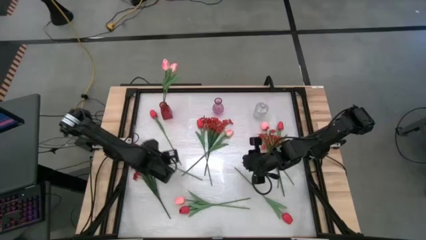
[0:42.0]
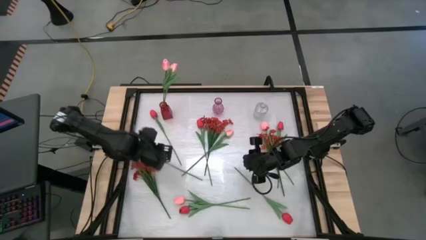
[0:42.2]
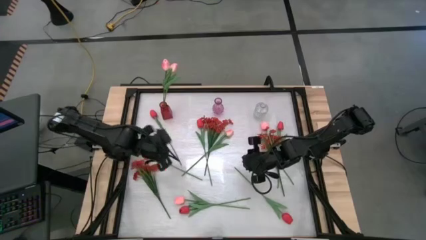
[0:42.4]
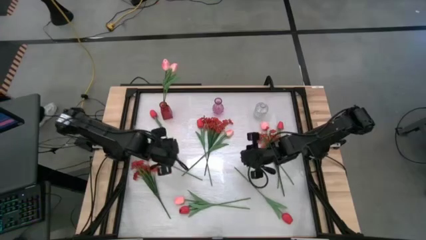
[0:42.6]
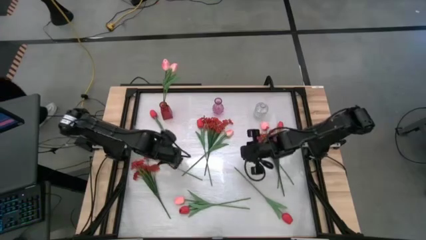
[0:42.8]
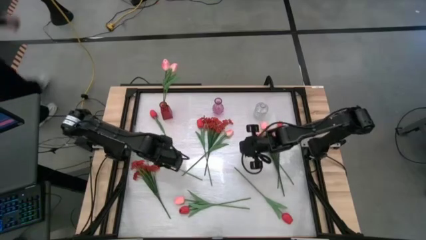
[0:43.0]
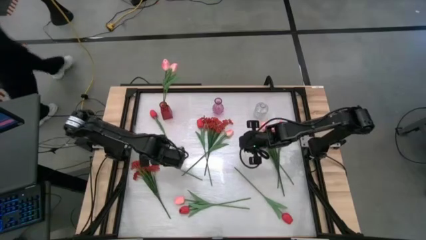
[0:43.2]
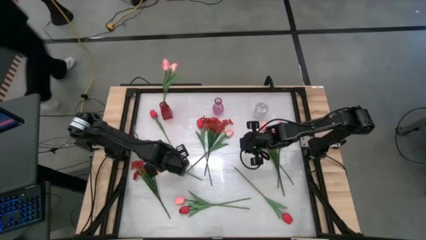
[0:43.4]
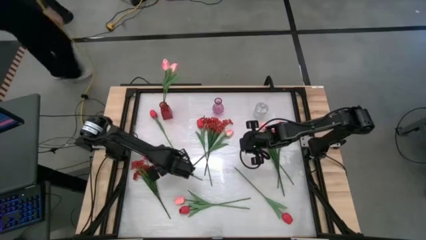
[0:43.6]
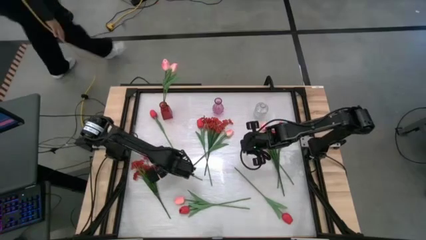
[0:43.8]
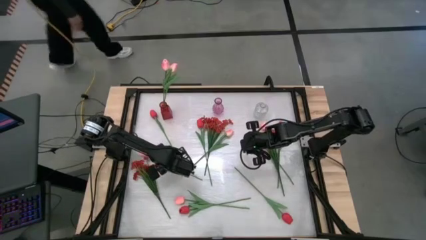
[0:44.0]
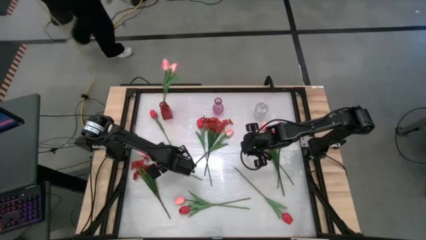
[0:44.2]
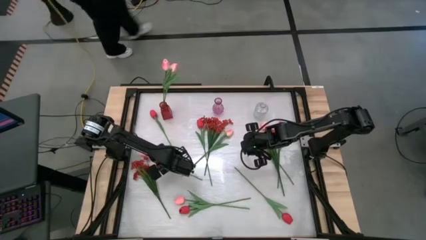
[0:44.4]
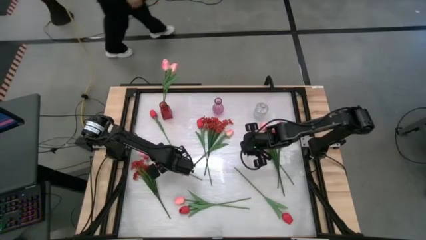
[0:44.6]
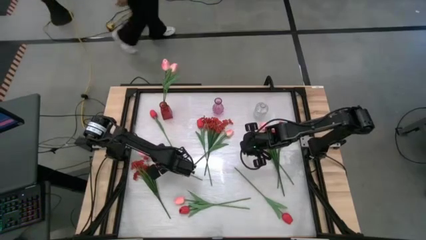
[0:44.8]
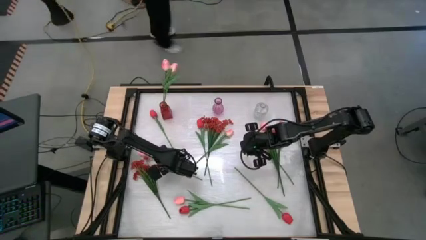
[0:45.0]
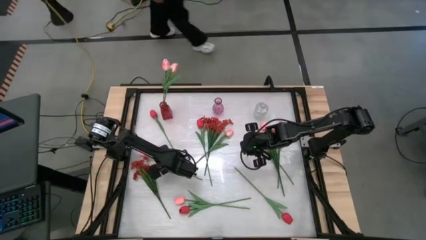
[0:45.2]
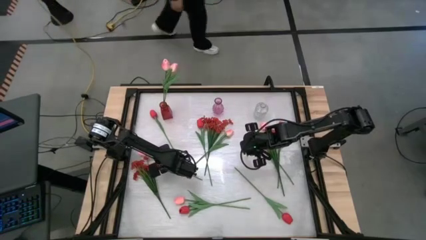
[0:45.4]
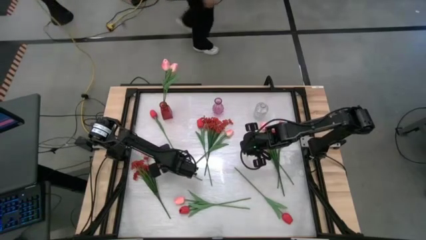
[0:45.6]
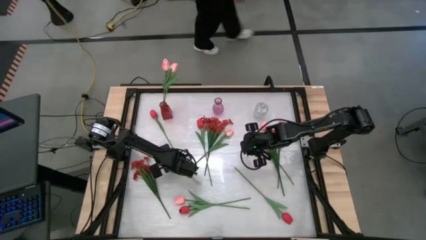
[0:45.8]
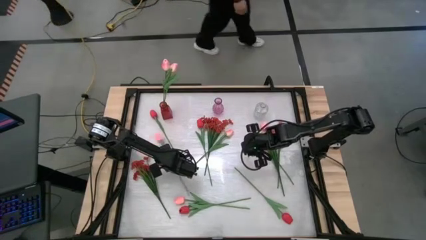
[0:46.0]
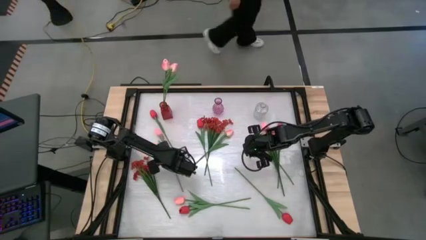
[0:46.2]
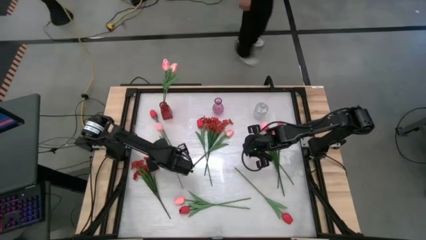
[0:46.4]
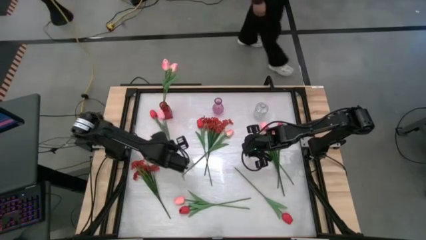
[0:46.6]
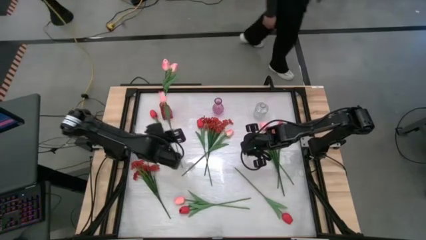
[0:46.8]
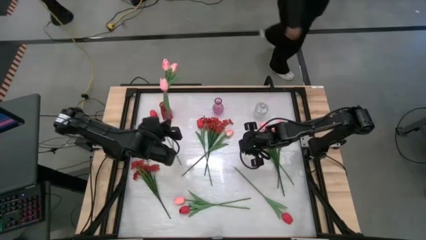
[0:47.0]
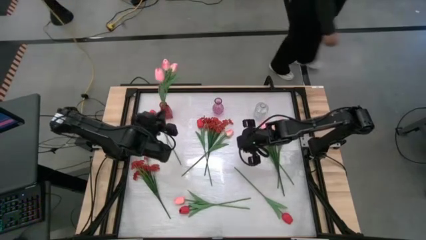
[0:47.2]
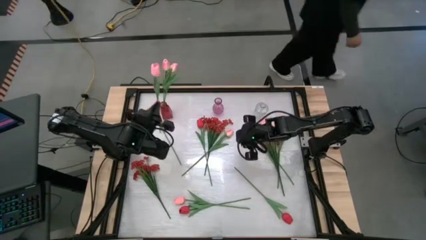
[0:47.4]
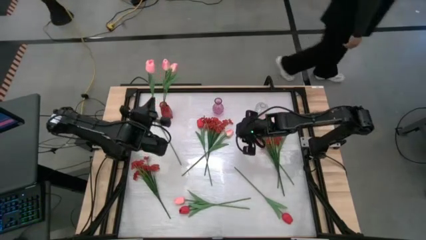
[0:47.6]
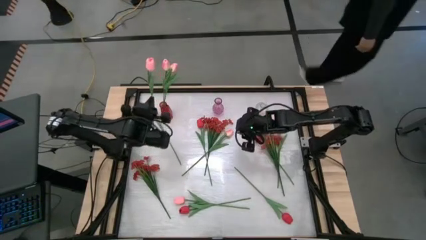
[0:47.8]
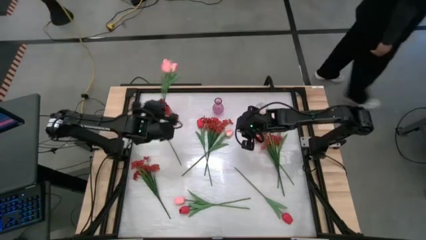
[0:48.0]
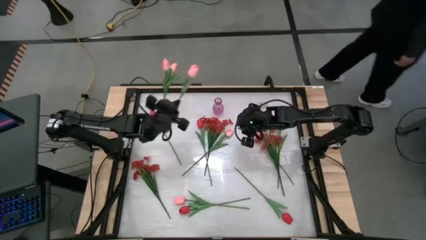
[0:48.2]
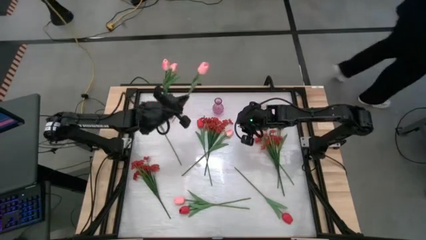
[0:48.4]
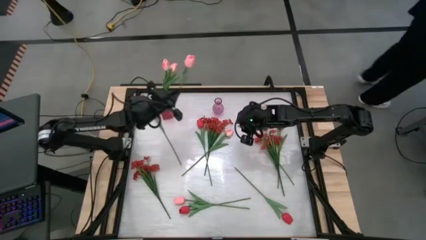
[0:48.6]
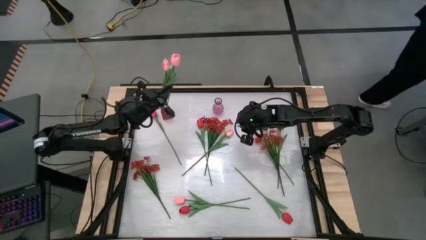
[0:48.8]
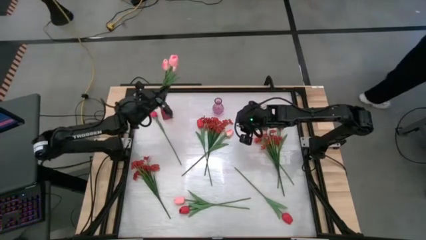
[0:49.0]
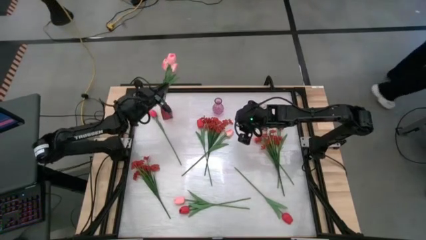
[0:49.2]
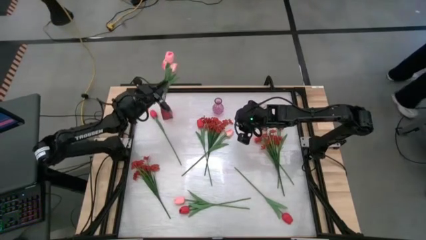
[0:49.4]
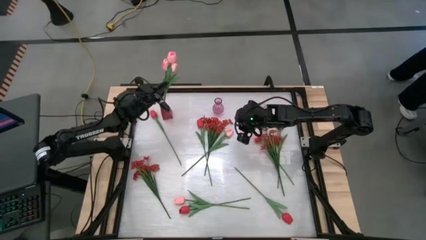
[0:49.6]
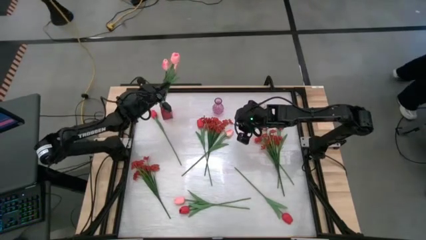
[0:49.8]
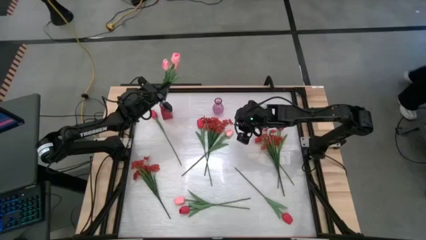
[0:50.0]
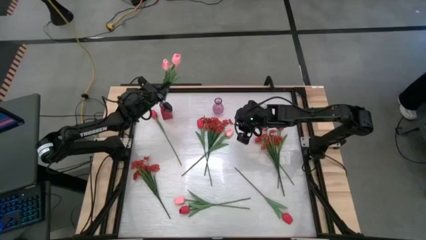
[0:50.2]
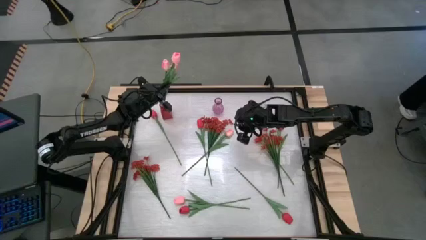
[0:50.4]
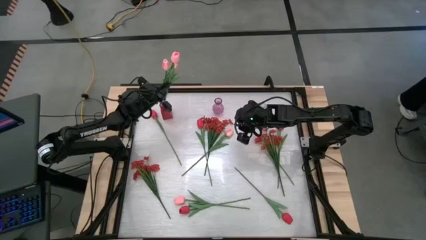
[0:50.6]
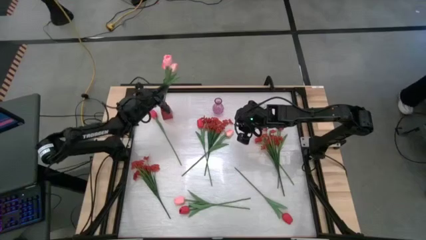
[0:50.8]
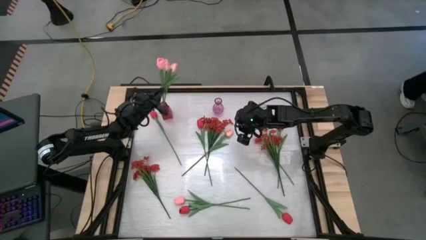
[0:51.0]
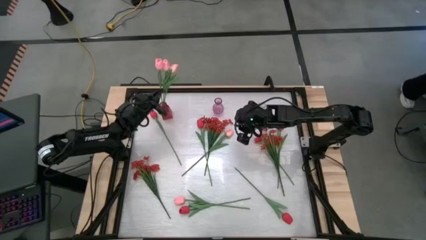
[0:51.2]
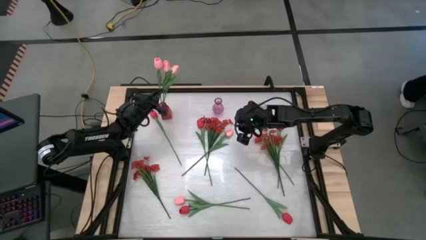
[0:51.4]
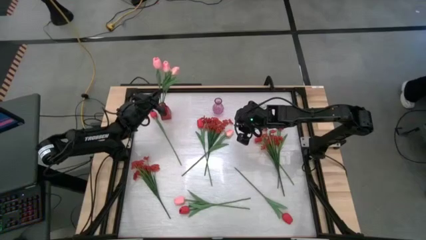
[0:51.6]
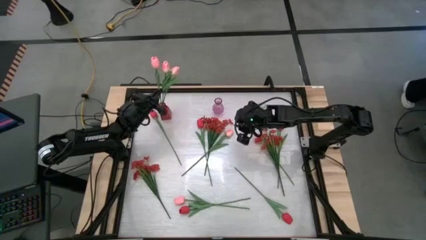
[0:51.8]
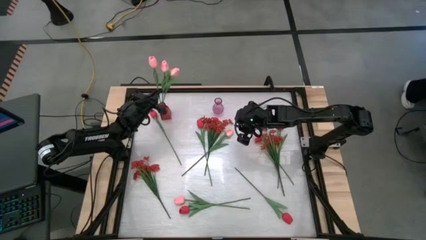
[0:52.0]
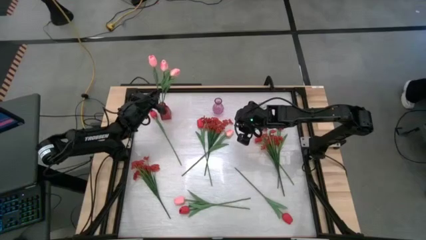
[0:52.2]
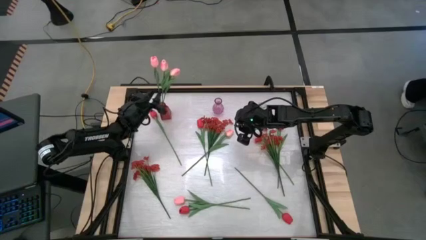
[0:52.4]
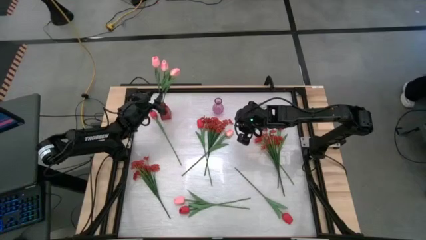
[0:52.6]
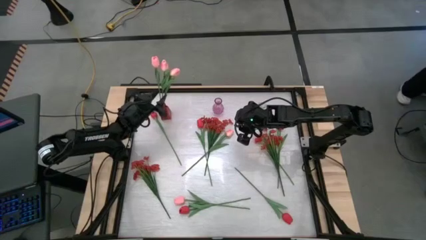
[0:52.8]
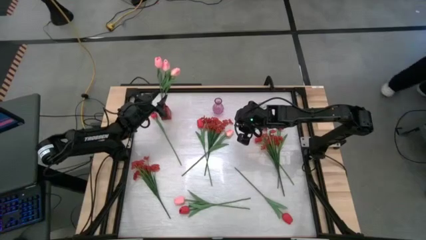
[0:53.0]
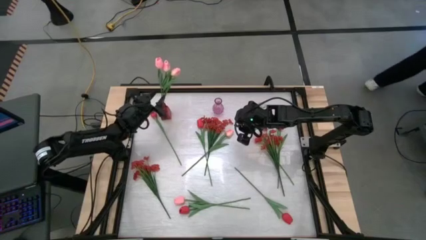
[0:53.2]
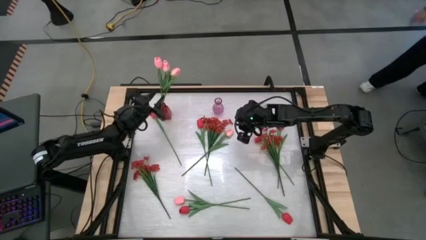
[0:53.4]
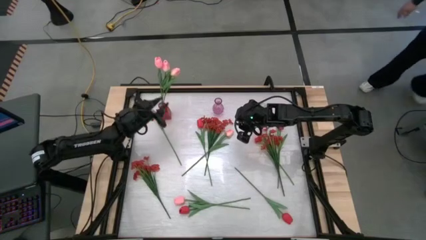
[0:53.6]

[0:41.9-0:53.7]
Task: Sort flowers into vase by color
Put the pink tulip into the red vase

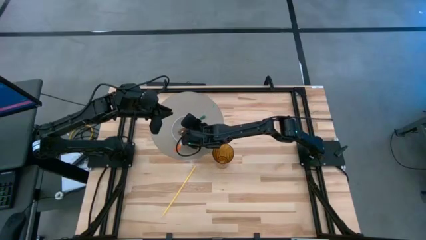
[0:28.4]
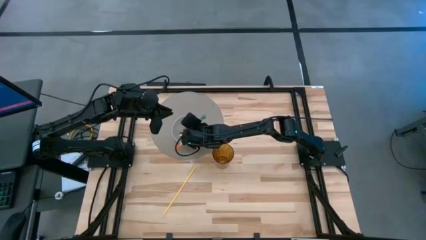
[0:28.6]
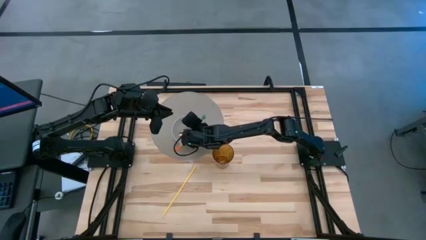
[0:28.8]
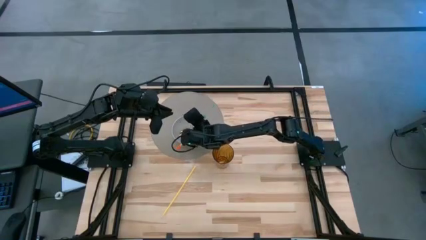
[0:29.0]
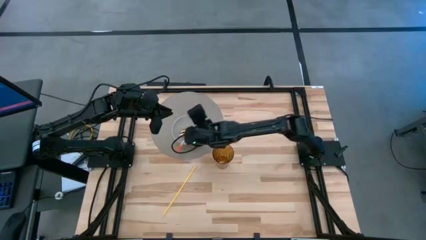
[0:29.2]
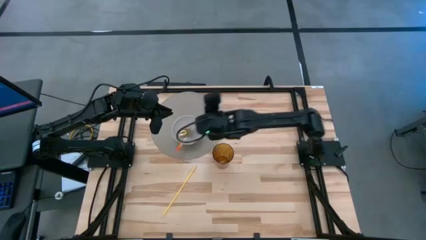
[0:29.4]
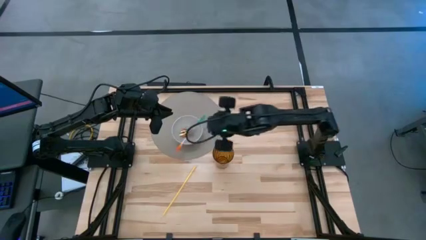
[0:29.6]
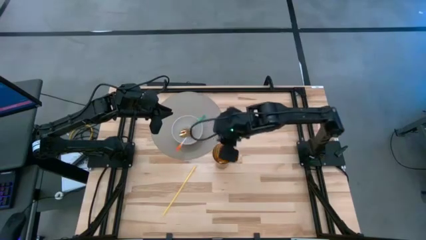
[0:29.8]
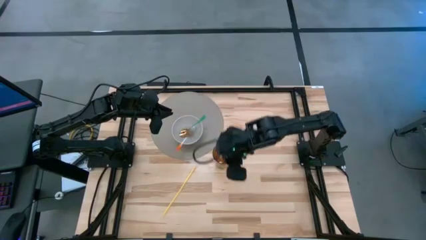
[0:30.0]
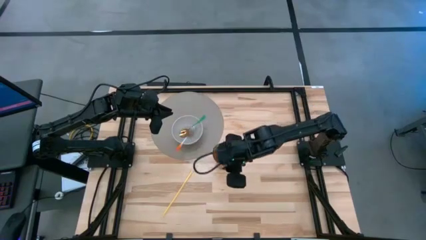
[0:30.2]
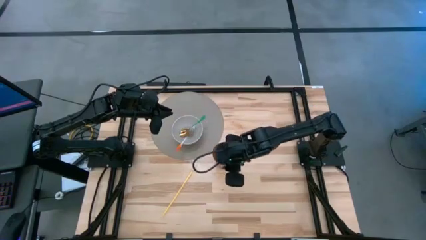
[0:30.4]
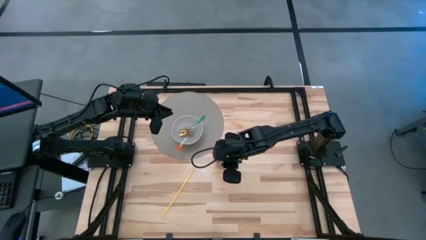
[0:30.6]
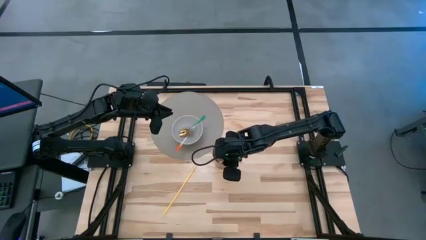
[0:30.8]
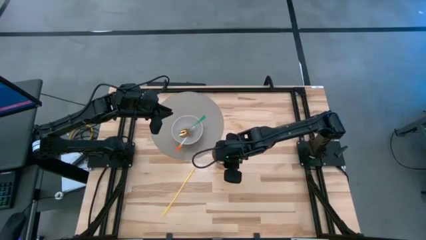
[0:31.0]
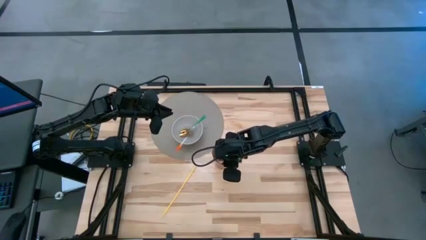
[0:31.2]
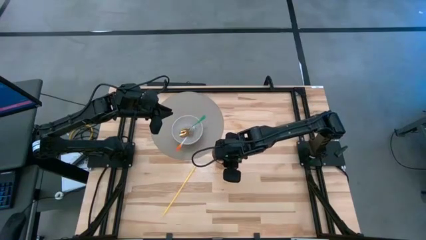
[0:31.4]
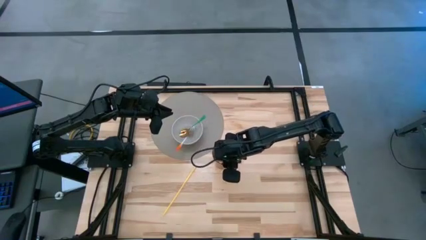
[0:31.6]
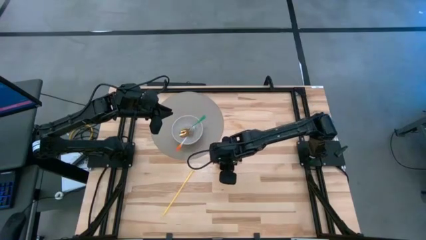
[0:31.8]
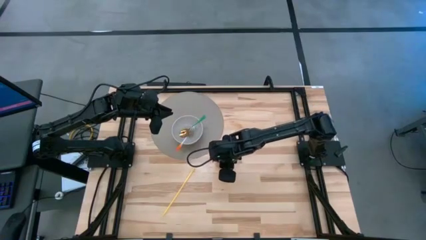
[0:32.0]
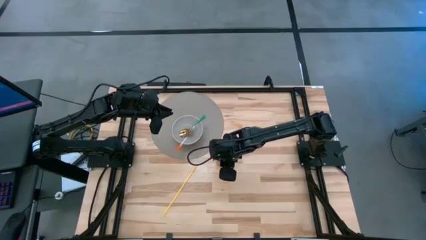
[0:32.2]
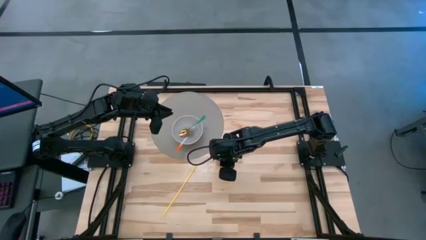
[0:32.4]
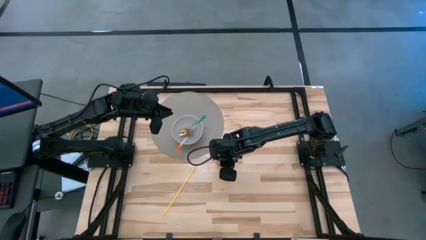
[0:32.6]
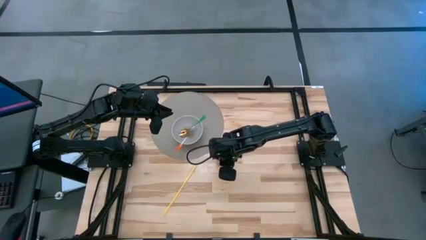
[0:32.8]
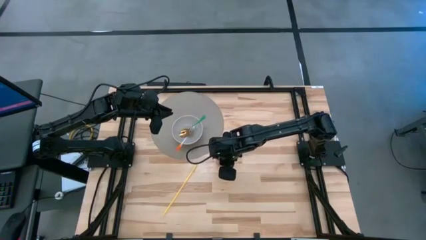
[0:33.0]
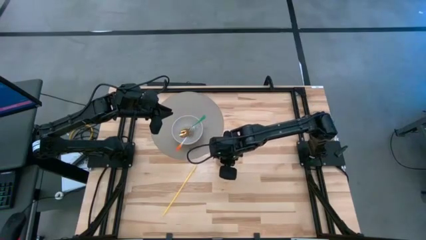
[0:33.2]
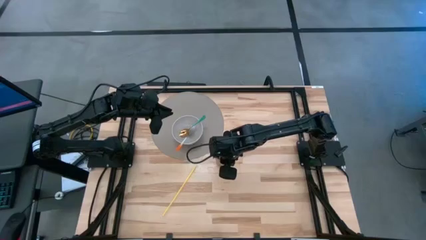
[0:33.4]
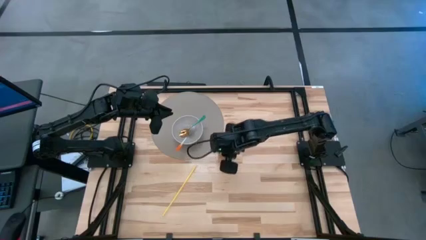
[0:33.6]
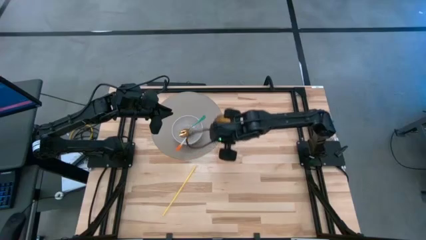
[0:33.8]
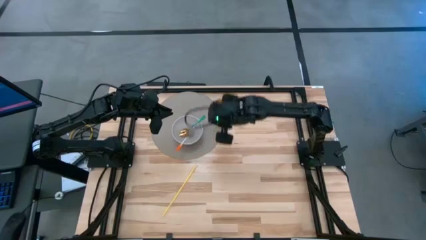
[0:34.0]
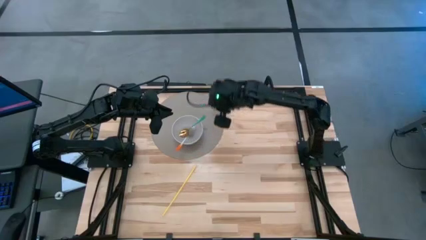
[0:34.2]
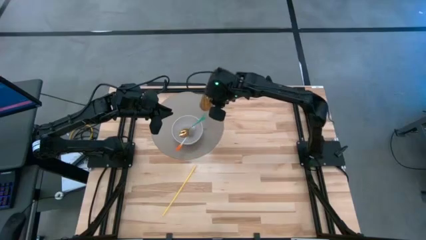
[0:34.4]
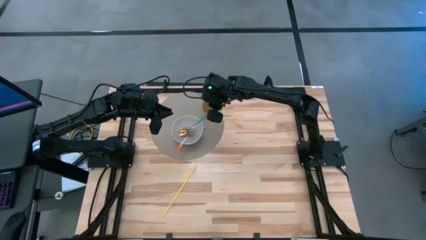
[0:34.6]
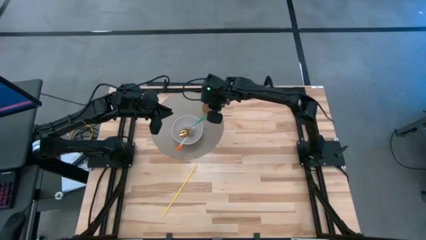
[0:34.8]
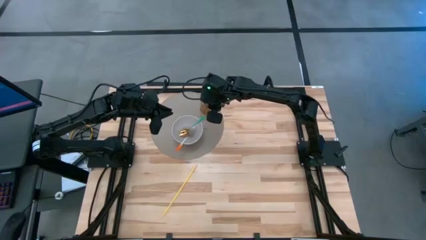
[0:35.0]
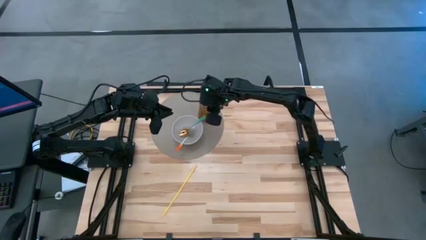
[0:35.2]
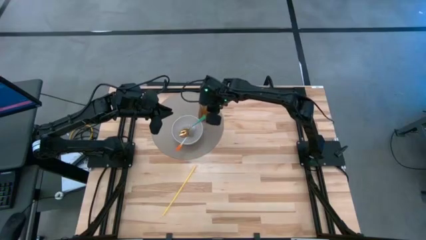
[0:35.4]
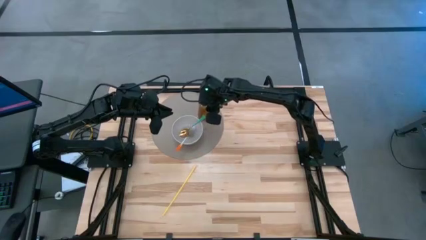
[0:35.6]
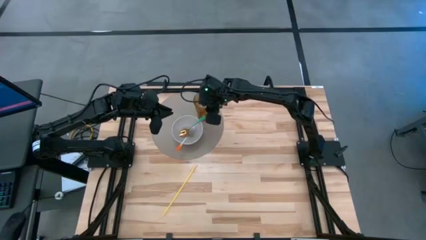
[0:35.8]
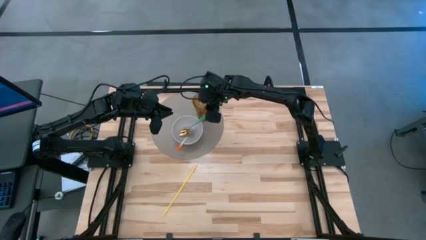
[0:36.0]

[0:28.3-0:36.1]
Task: Pick & Place Utensil
Put the cup to the top right of the bowl on the table placemat
